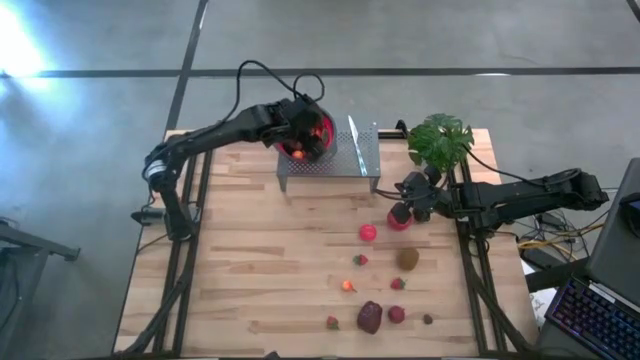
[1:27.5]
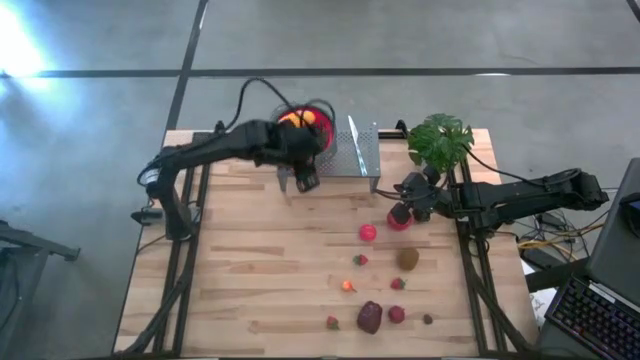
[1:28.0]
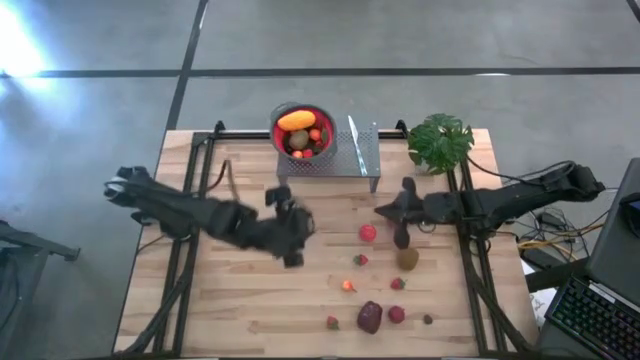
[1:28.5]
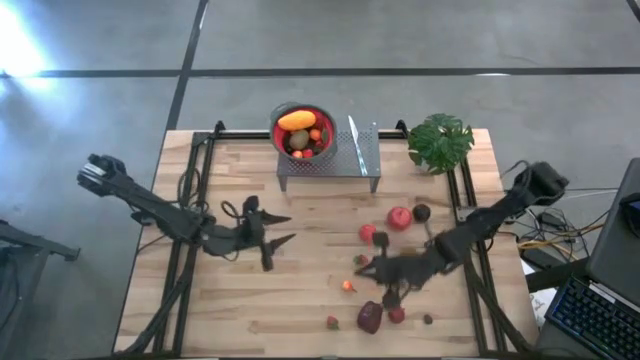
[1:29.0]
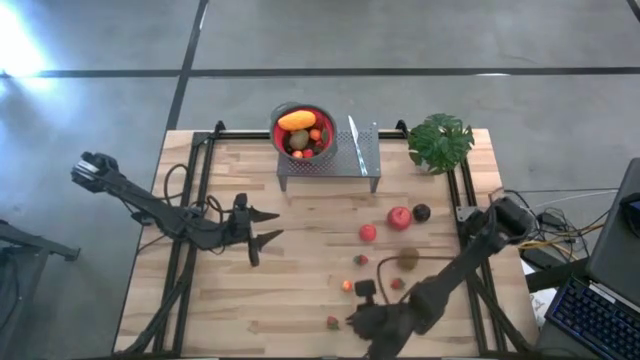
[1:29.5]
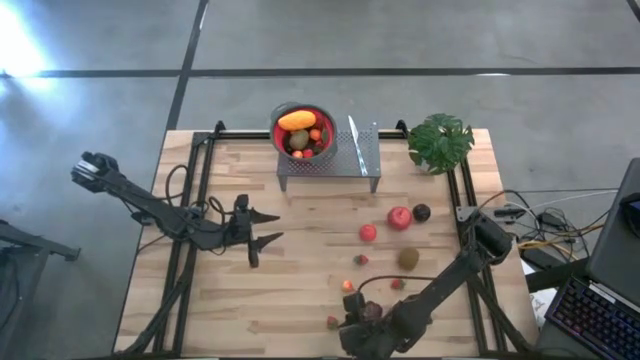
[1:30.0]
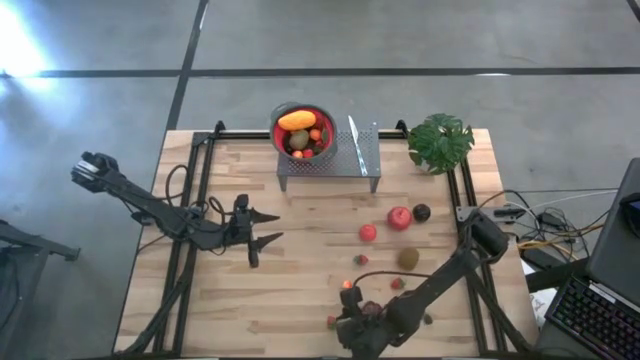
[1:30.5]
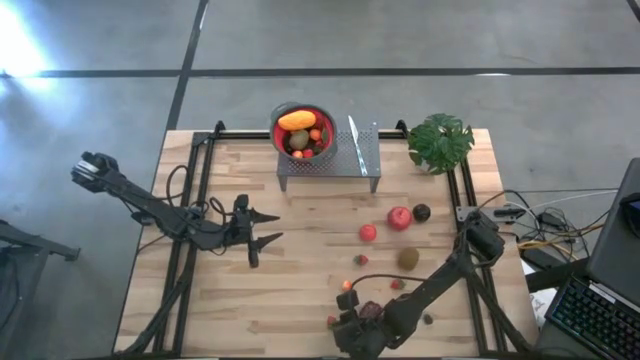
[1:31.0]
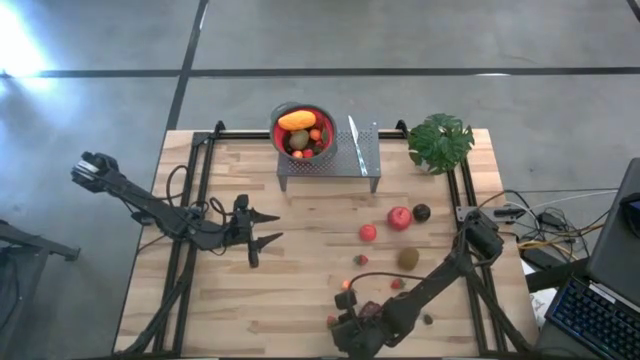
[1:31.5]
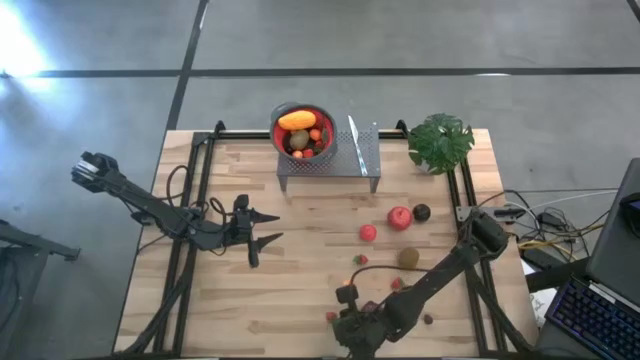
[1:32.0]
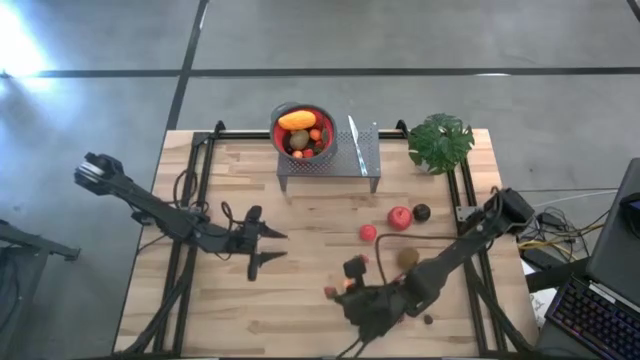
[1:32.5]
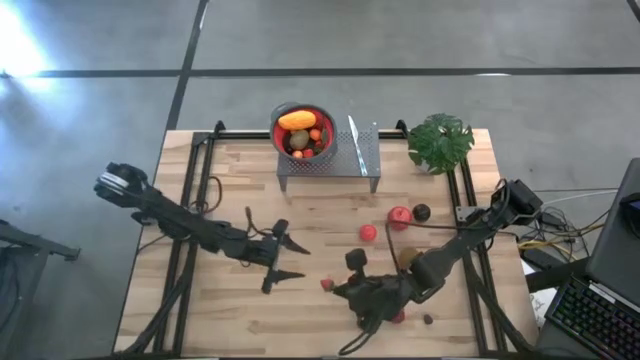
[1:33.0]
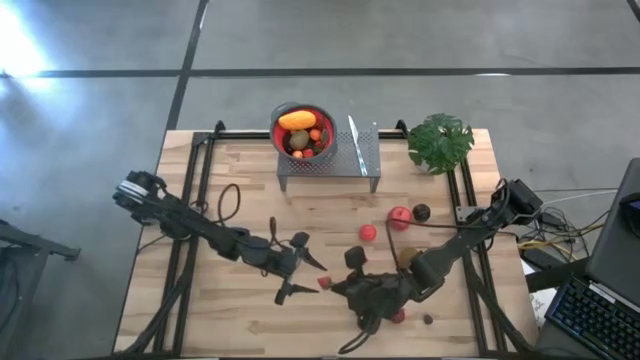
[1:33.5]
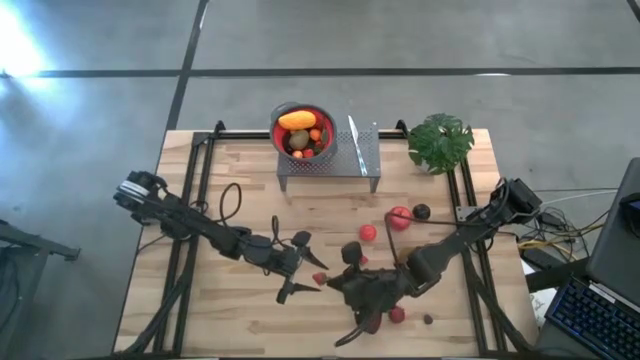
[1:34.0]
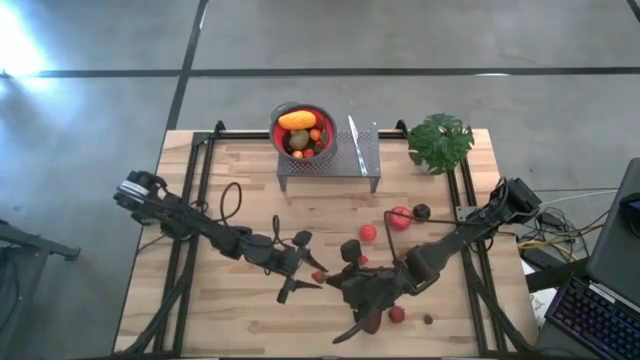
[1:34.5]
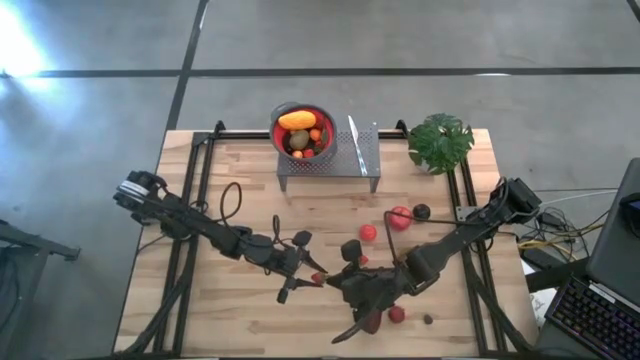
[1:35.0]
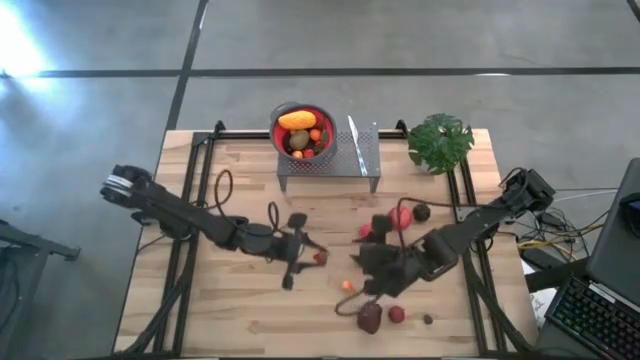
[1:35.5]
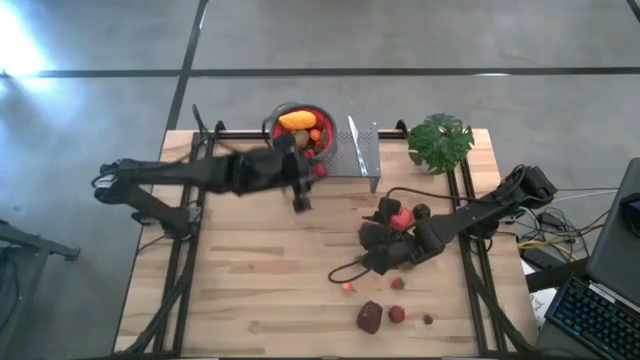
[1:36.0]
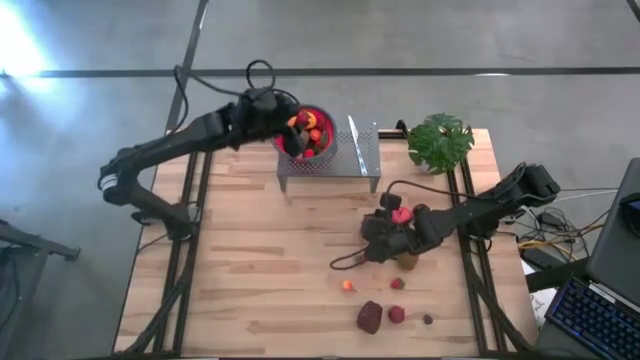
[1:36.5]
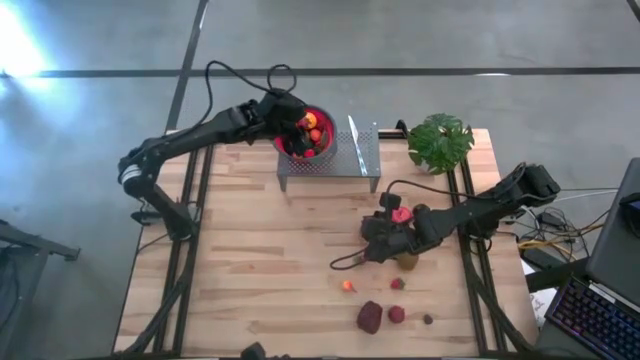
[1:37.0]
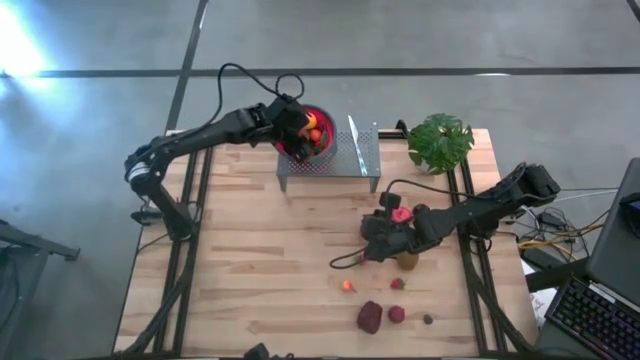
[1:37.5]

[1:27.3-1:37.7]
Task: Pick & Place Fruit
Put the bottom left red strawberry into the red strainer bowl on the shelf

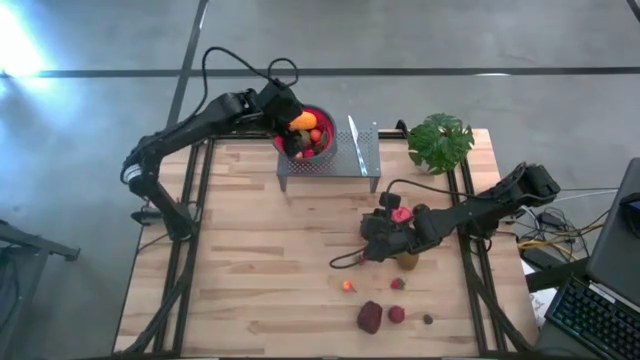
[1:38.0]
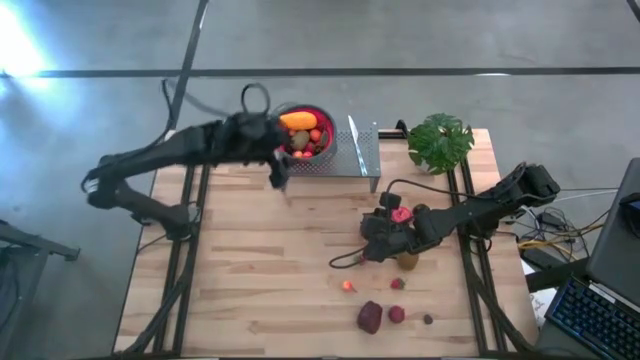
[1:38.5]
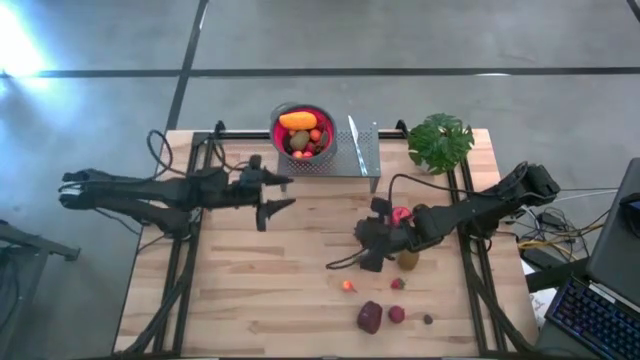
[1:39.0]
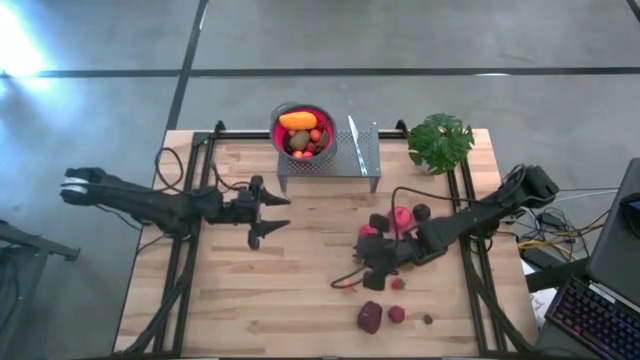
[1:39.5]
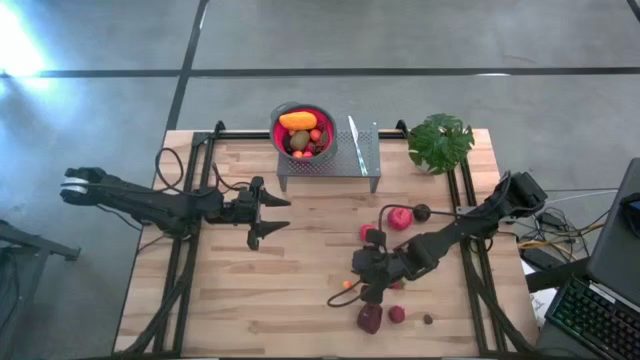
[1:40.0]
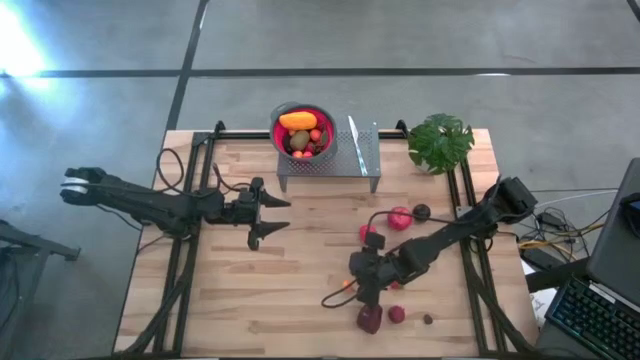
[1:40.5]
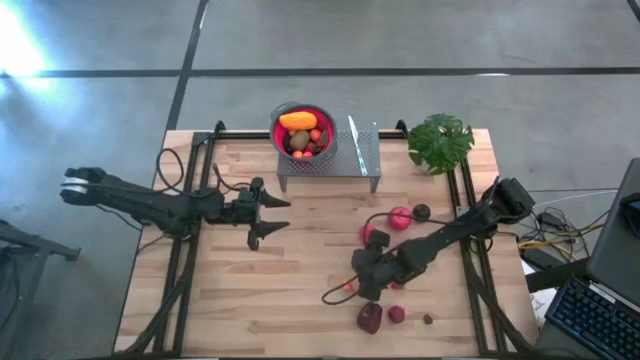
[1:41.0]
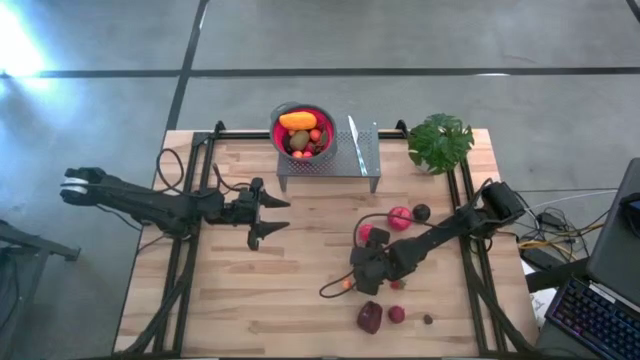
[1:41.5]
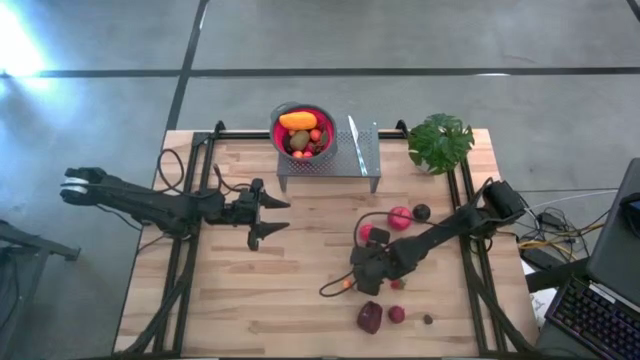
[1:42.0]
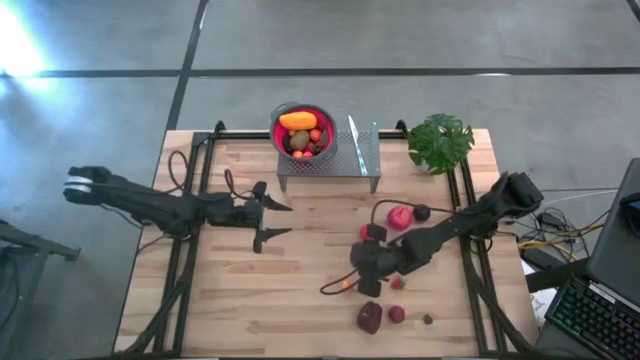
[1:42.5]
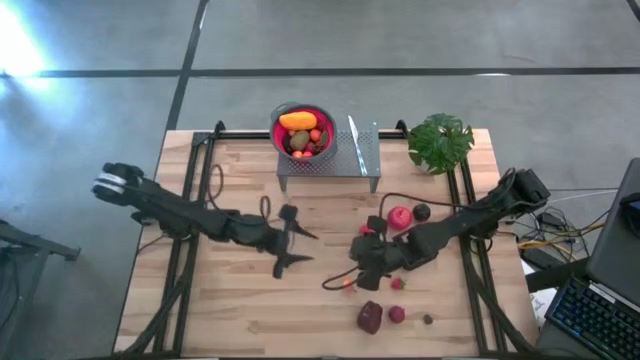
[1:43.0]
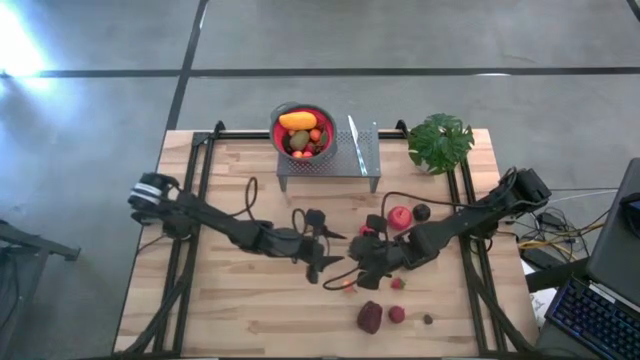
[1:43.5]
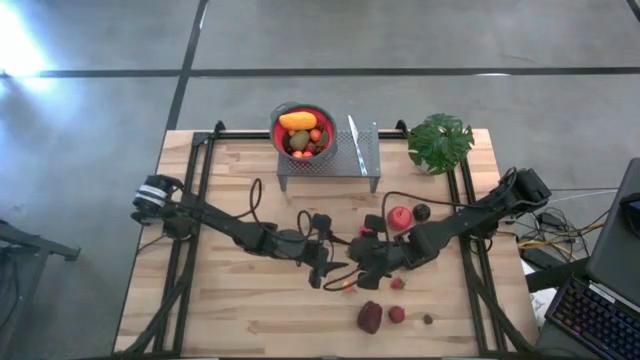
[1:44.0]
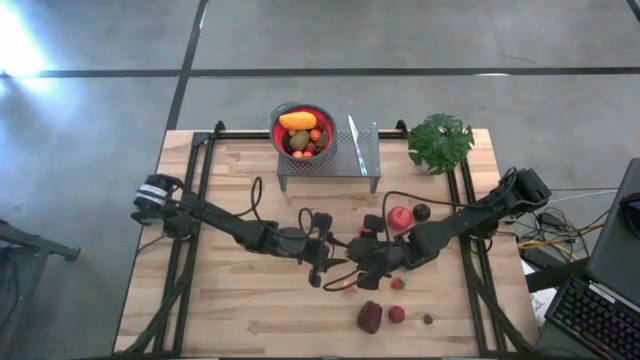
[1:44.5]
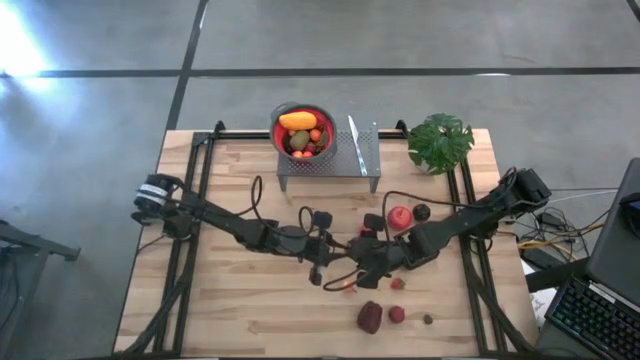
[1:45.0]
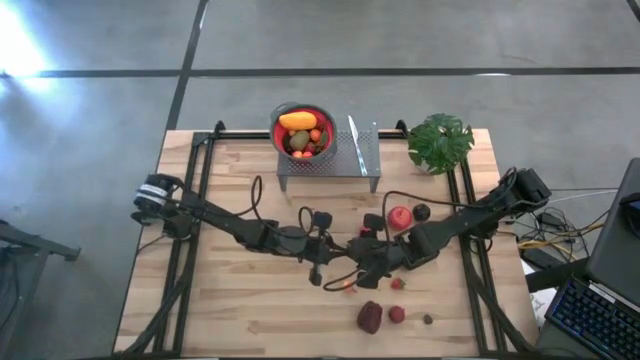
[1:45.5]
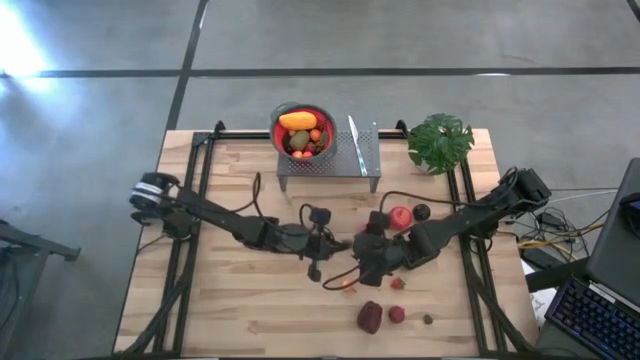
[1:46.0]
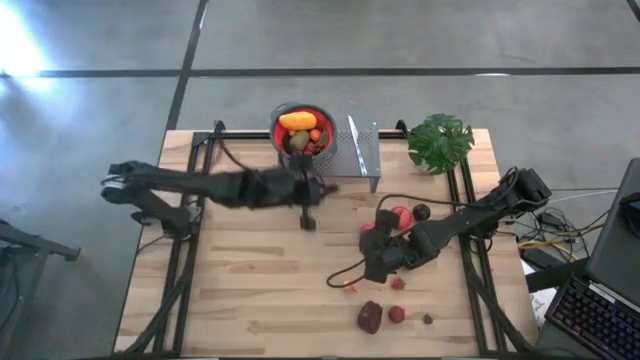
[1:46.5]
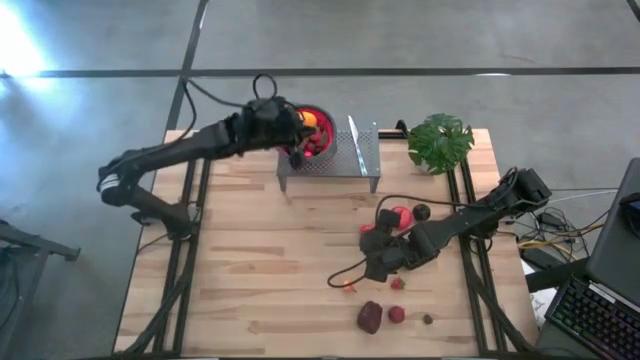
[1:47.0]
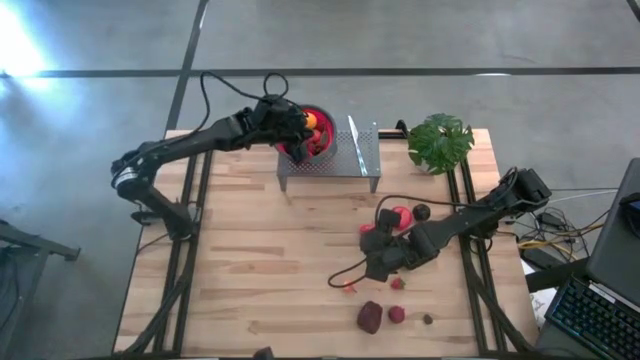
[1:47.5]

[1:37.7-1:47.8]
Put the top red strawberry into the red strainer bowl on the shelf

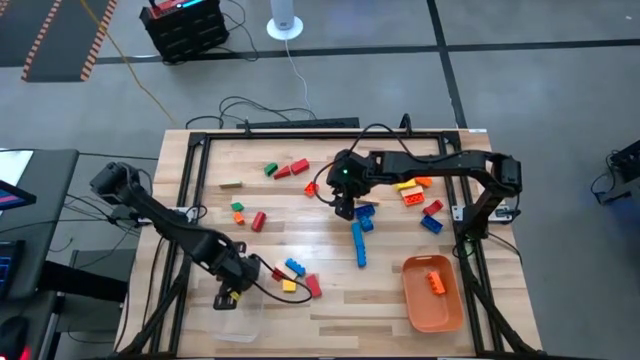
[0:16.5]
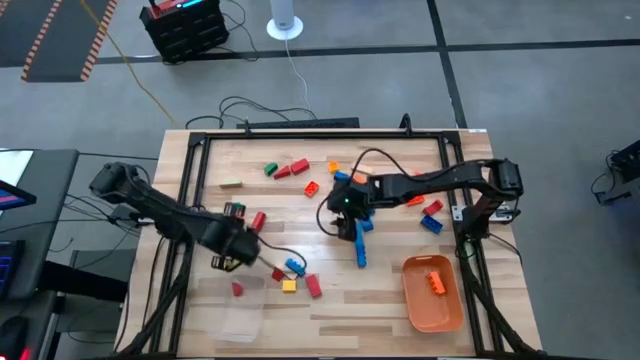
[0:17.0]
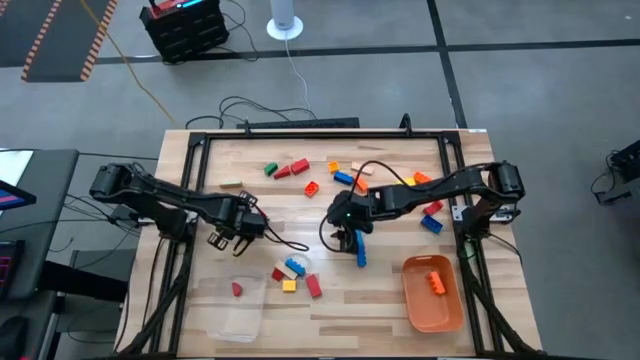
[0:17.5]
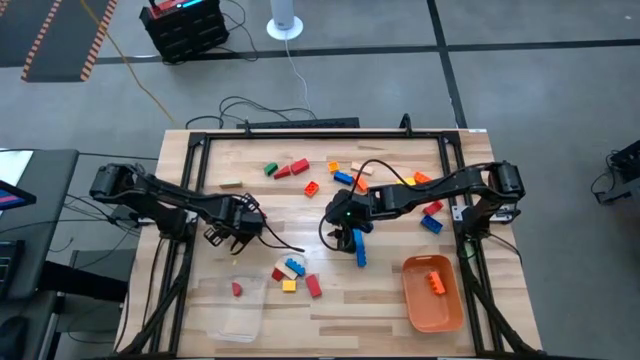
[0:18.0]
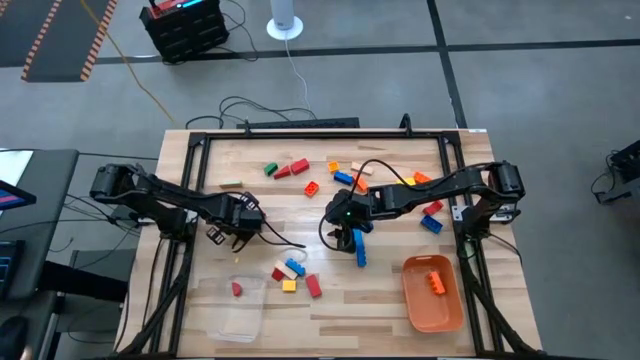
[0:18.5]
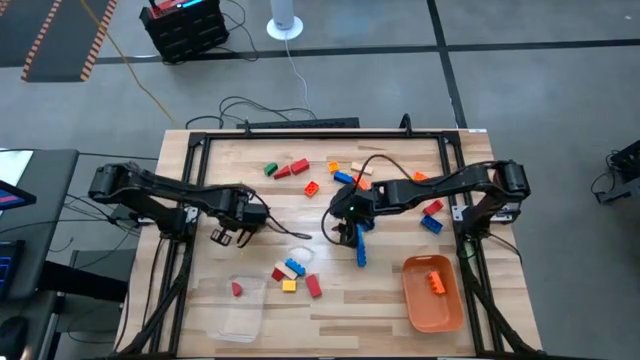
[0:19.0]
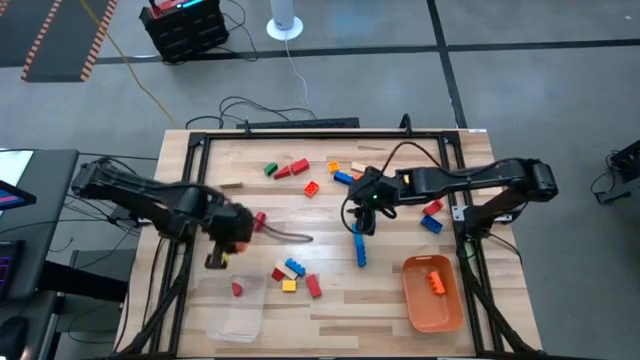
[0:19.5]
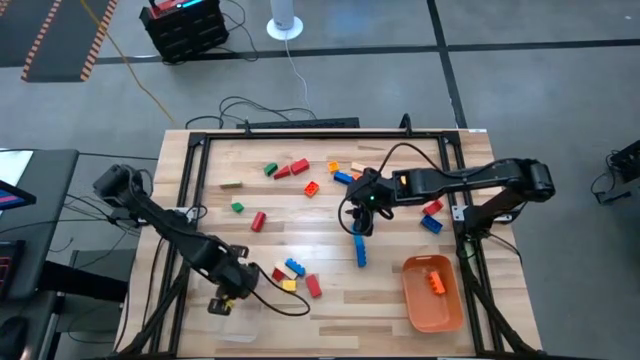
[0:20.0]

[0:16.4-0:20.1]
Task: Sort blocks by size
Put the small orange game piece into the transparent bin
